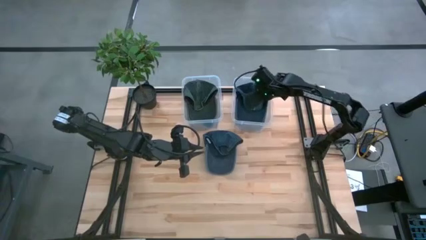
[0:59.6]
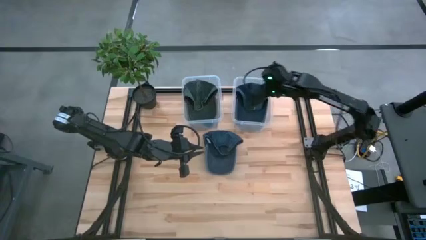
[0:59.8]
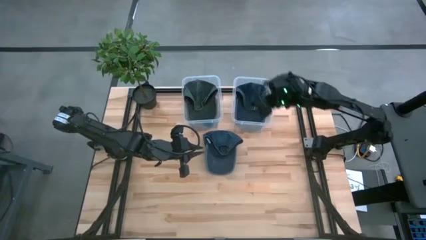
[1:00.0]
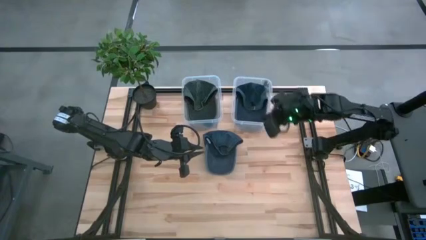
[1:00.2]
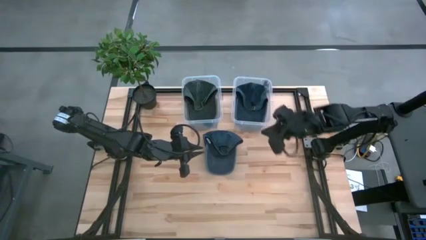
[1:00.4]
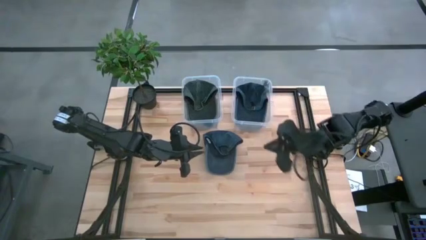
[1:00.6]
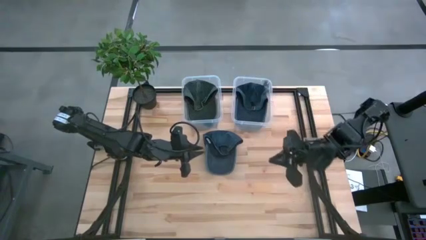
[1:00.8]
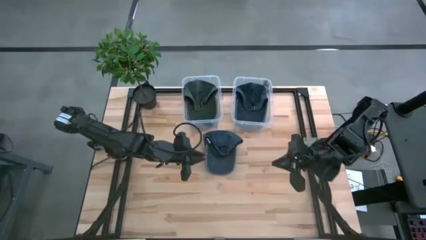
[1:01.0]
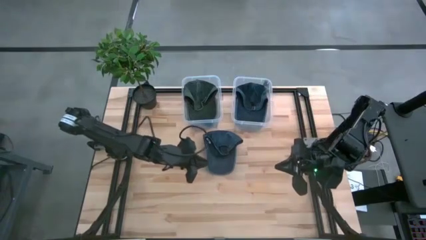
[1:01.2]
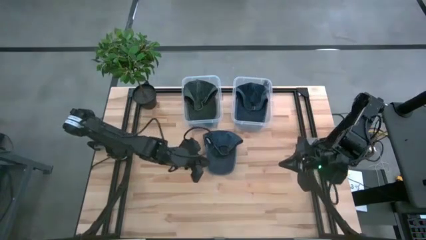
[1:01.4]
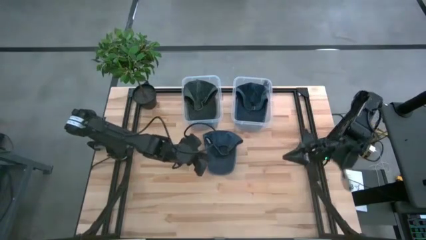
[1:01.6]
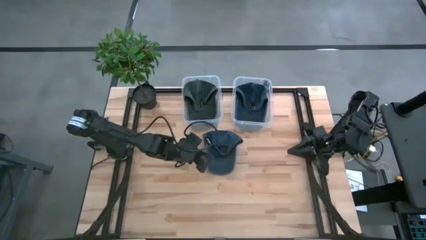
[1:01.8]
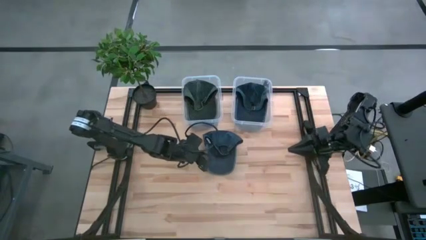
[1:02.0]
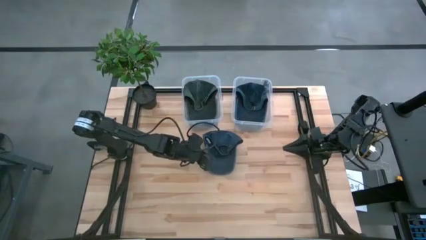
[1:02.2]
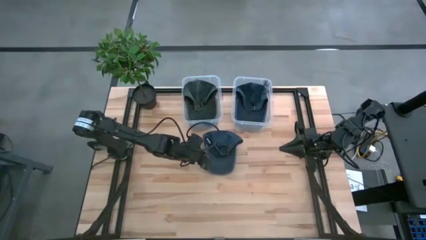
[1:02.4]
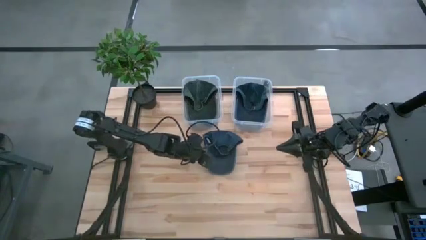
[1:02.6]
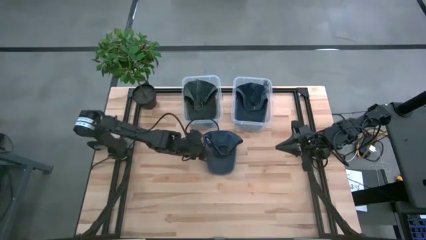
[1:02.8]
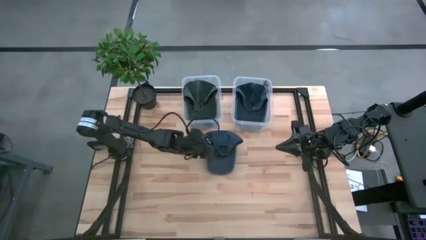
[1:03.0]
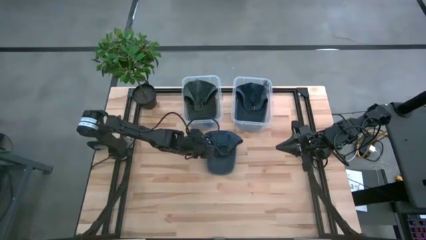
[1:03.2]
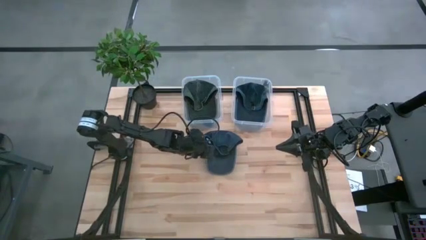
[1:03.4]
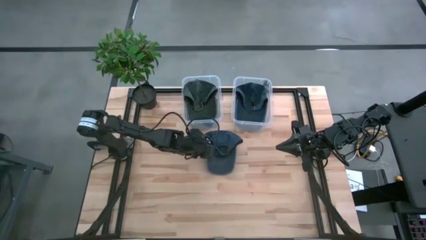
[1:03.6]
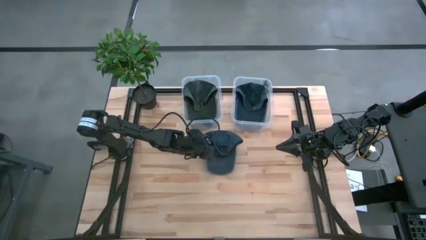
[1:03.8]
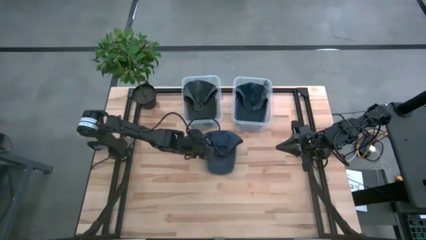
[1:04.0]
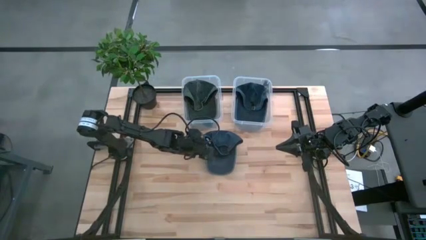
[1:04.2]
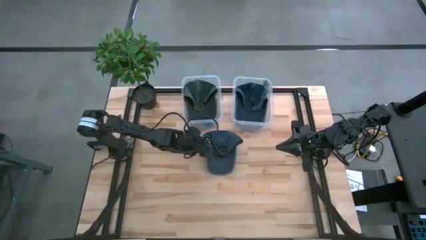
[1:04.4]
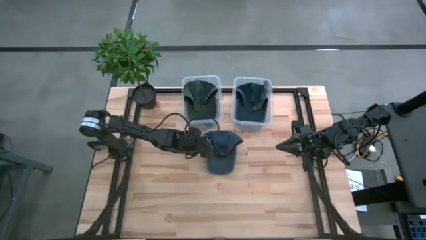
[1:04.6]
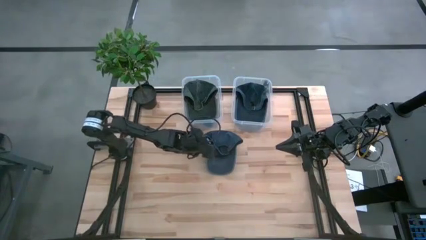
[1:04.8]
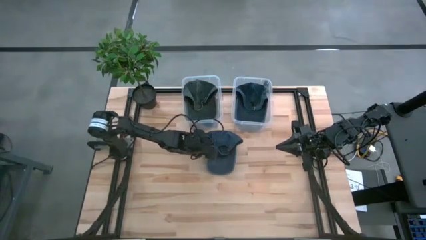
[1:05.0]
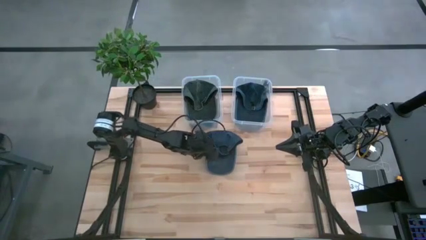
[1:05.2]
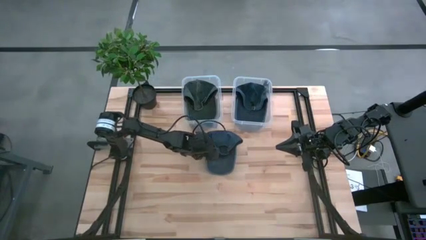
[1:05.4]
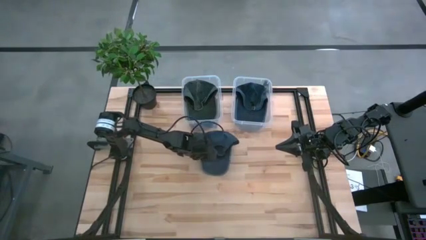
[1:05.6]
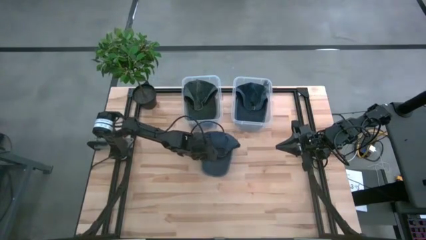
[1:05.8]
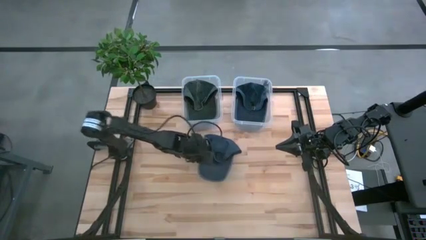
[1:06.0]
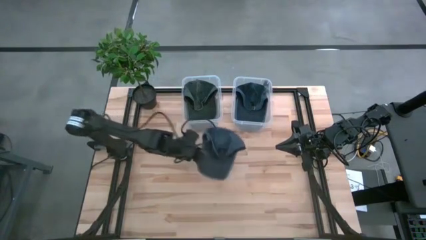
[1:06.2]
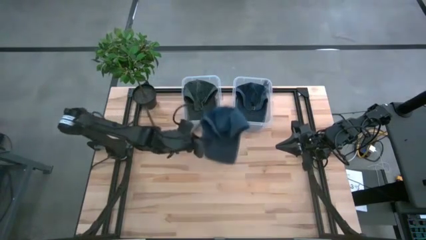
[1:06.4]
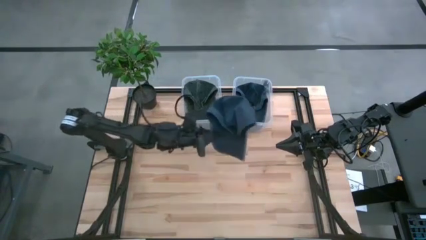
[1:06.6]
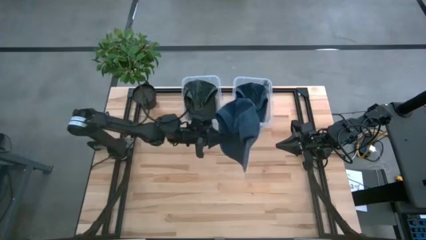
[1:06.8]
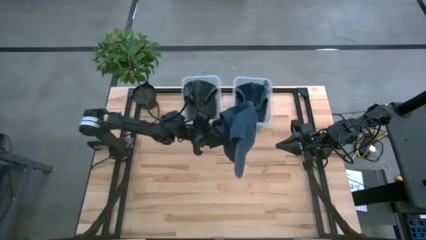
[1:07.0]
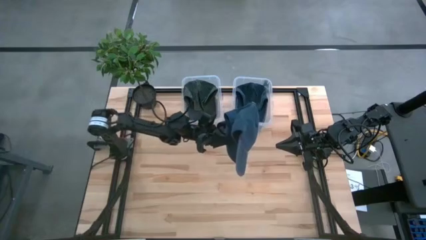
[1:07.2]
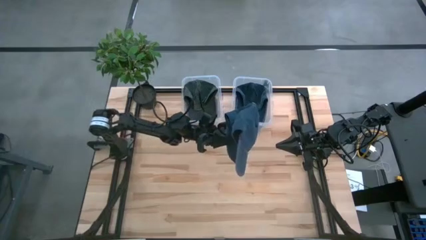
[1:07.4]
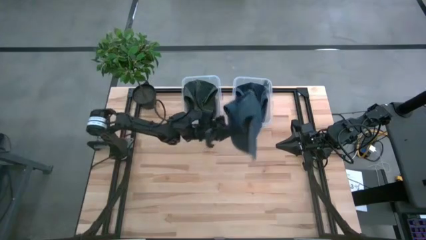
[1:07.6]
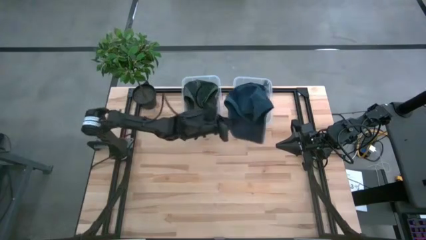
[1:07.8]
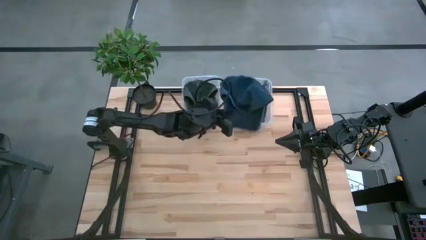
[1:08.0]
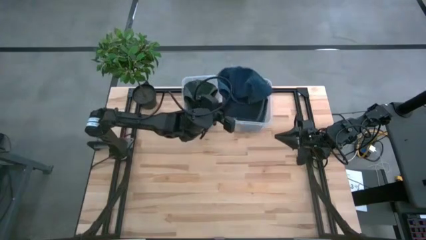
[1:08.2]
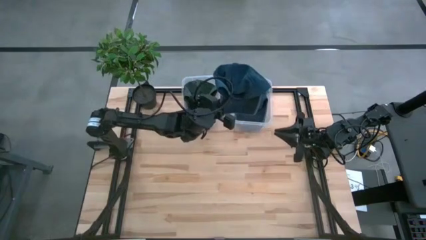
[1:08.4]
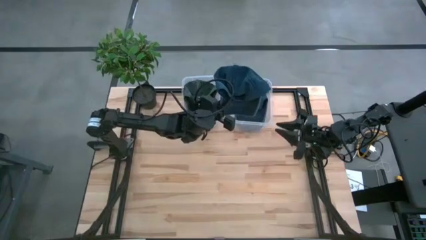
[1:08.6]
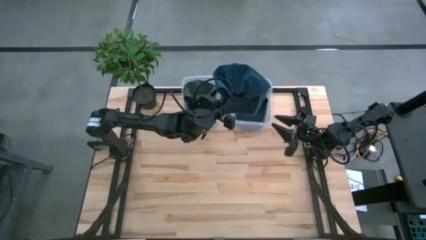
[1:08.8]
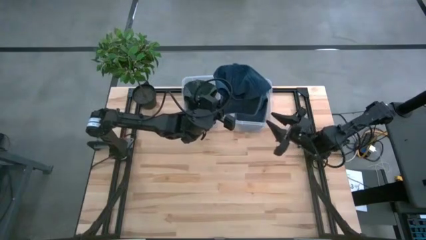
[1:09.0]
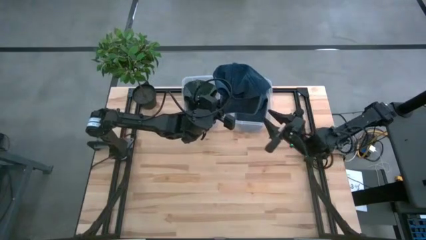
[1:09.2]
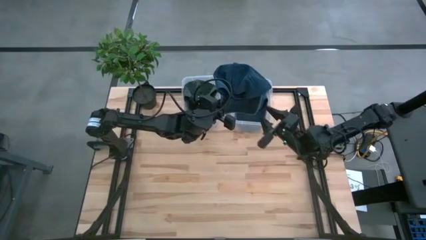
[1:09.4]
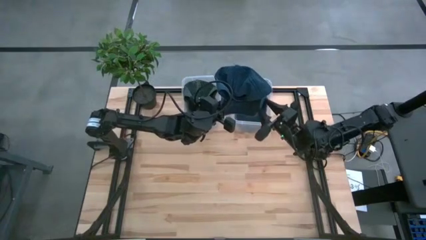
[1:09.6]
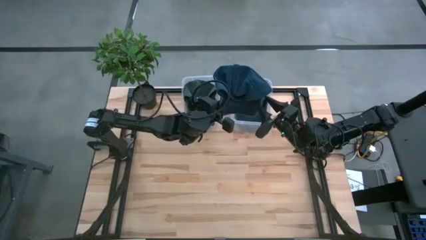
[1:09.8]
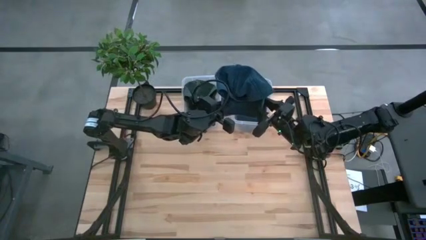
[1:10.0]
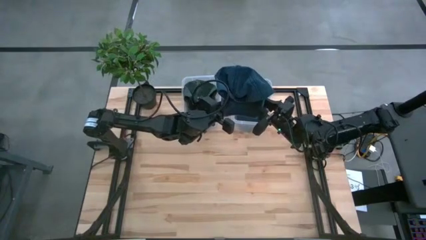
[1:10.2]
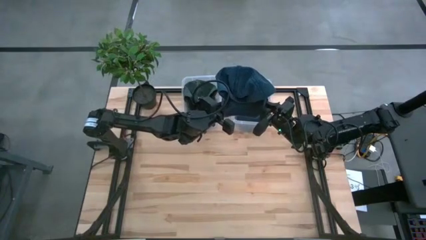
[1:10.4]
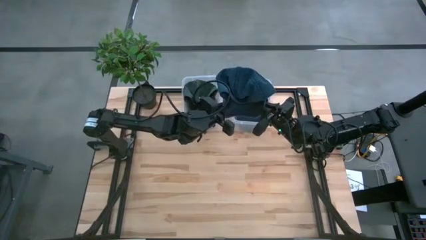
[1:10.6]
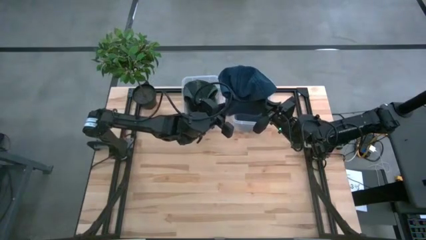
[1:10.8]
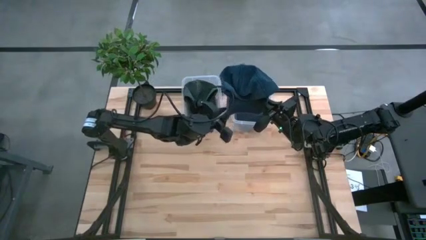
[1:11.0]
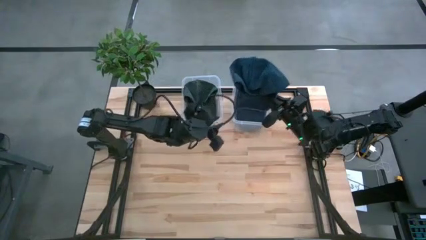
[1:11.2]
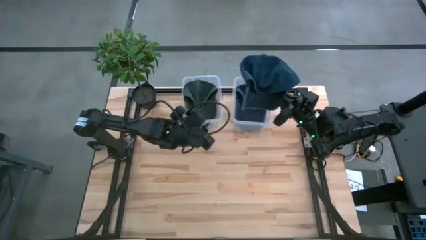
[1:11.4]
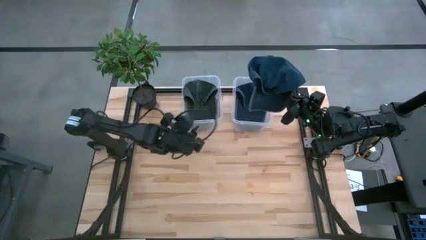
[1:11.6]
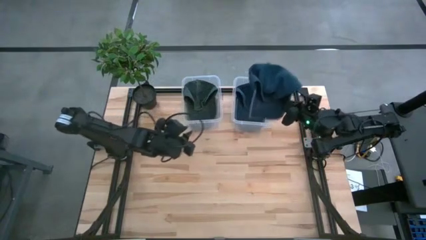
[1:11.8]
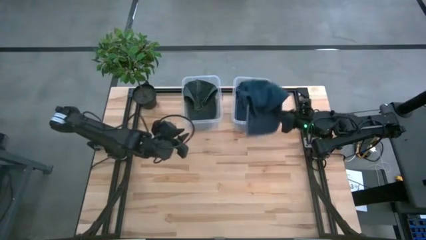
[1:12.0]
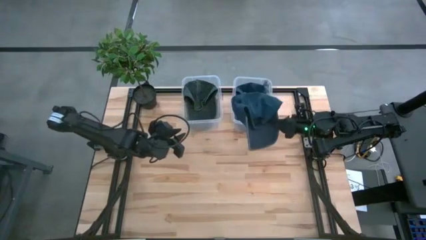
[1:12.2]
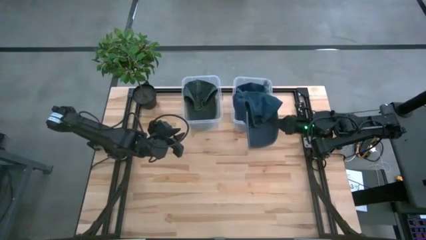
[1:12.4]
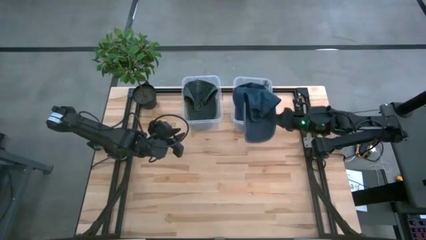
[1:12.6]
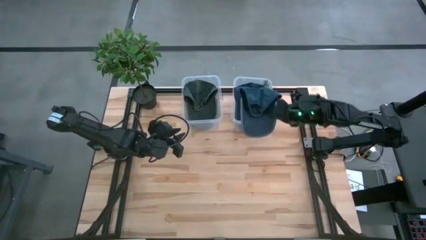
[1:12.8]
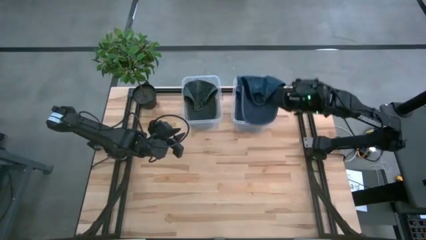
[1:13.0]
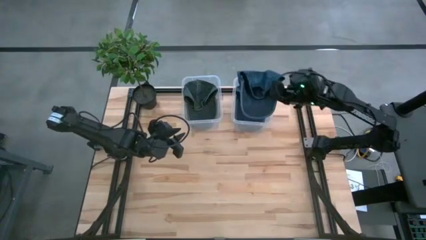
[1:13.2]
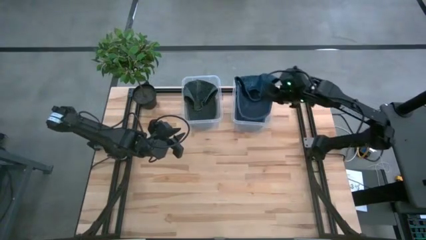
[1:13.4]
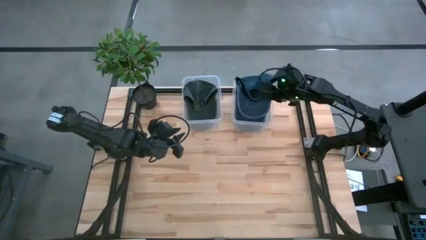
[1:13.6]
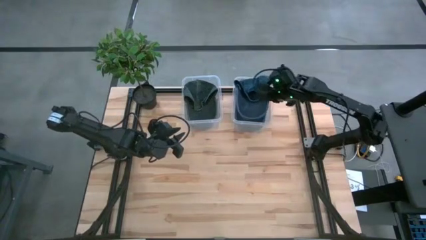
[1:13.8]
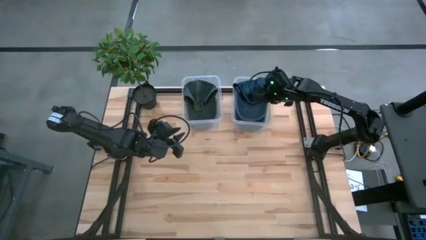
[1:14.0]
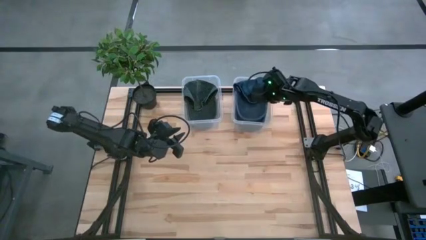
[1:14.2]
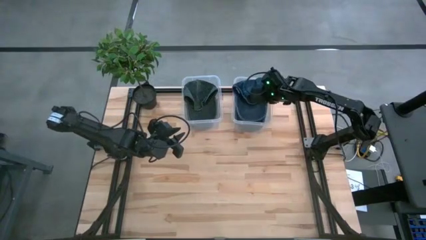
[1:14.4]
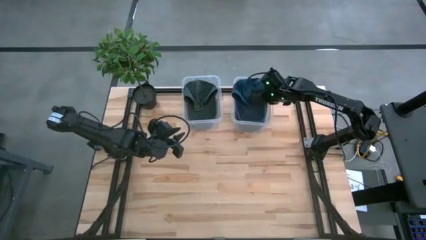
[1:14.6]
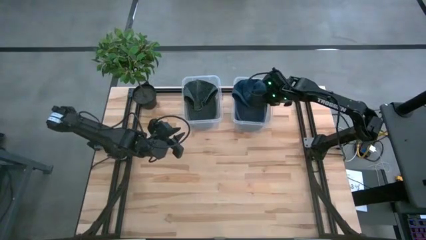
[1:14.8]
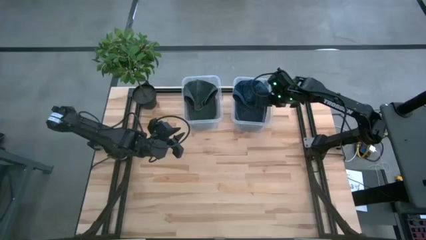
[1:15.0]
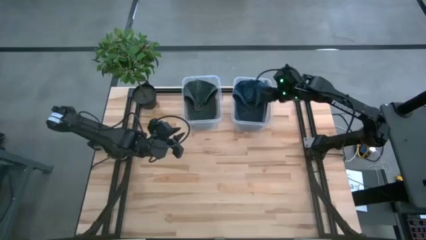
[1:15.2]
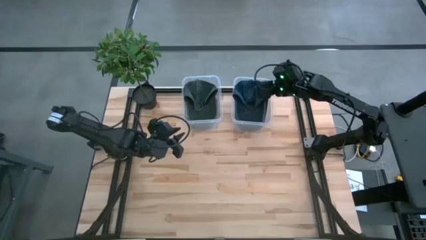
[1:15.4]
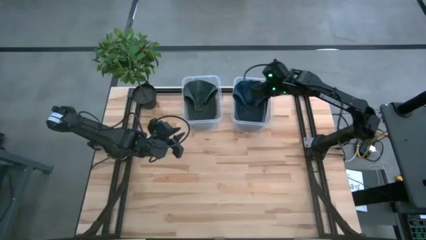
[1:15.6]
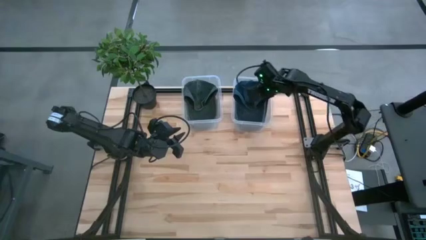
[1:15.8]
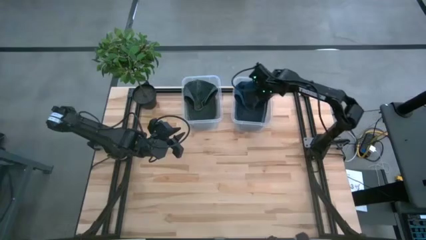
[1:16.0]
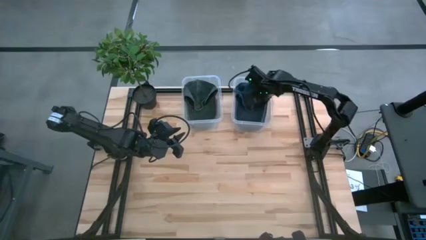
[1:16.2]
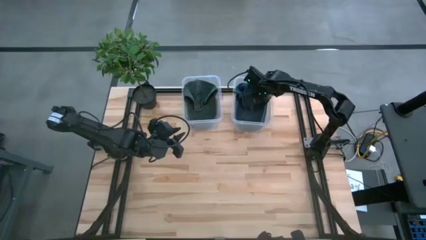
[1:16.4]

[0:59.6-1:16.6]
Task: Pick & Place hat
Put the blue cap into the right transparent bin
